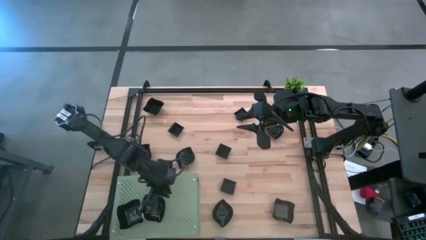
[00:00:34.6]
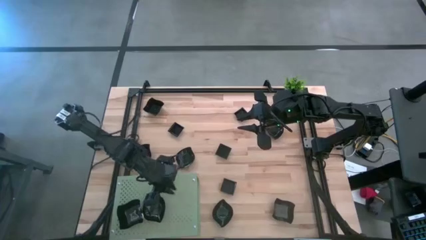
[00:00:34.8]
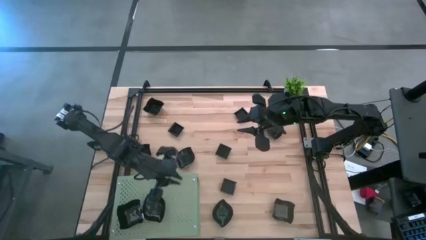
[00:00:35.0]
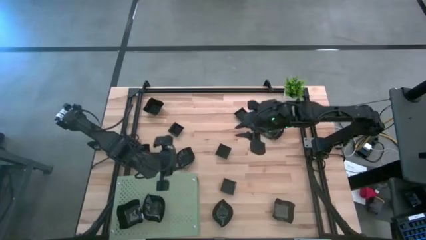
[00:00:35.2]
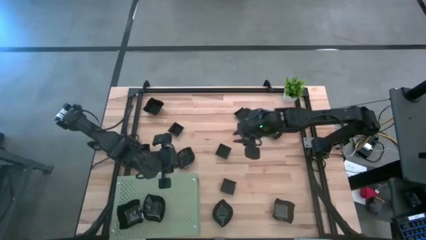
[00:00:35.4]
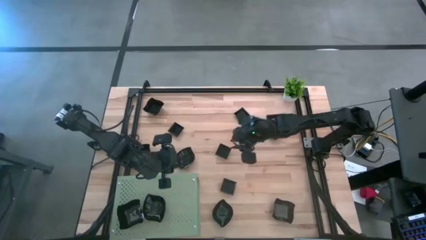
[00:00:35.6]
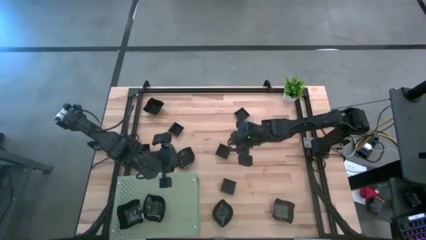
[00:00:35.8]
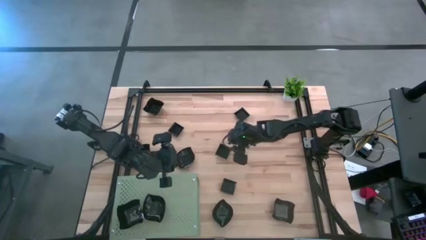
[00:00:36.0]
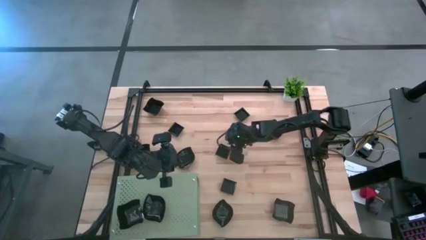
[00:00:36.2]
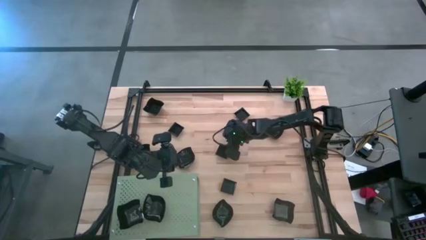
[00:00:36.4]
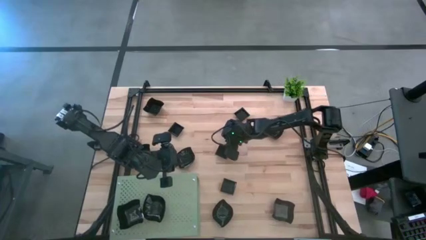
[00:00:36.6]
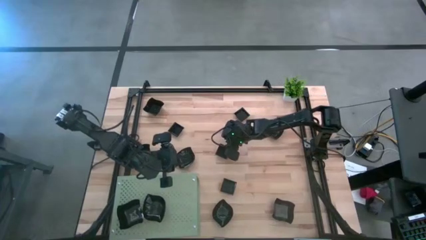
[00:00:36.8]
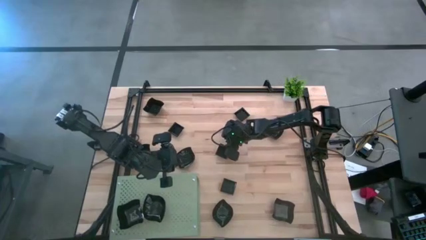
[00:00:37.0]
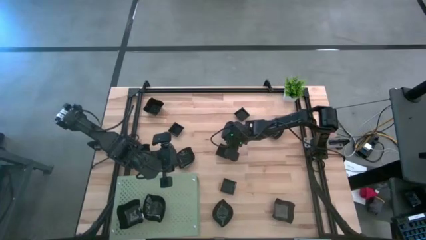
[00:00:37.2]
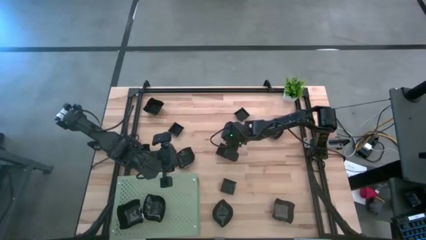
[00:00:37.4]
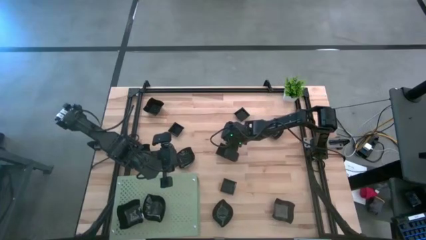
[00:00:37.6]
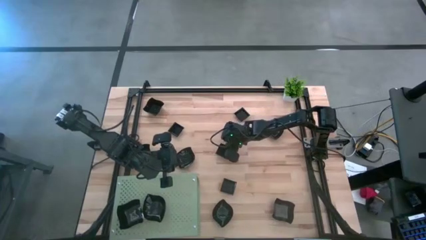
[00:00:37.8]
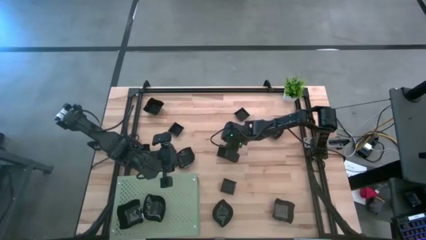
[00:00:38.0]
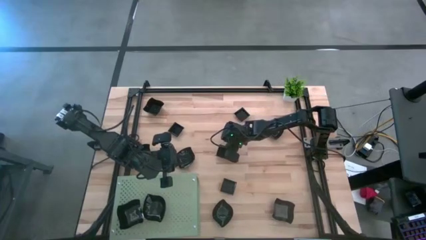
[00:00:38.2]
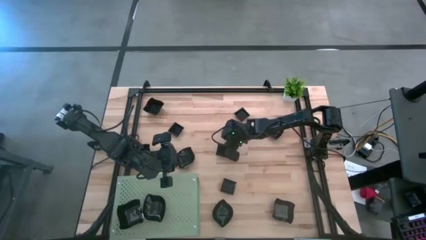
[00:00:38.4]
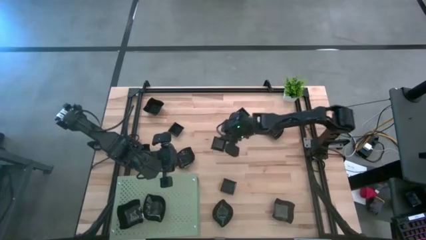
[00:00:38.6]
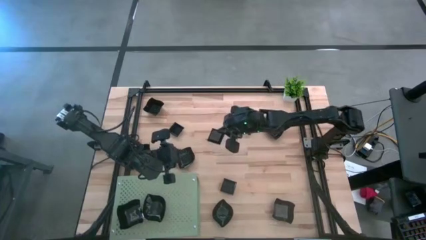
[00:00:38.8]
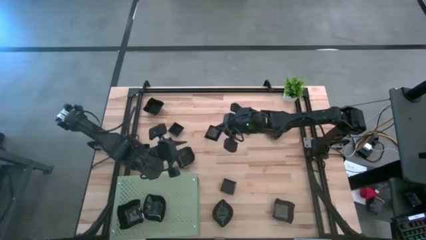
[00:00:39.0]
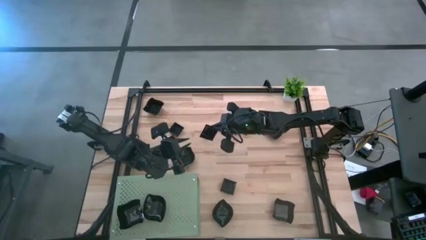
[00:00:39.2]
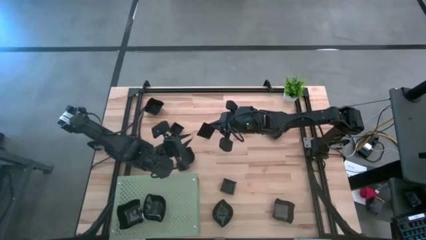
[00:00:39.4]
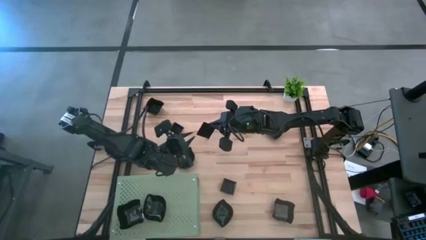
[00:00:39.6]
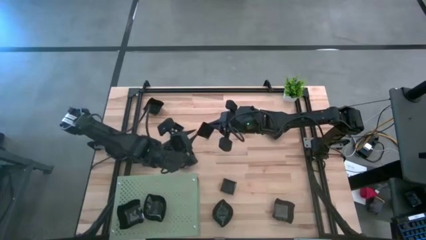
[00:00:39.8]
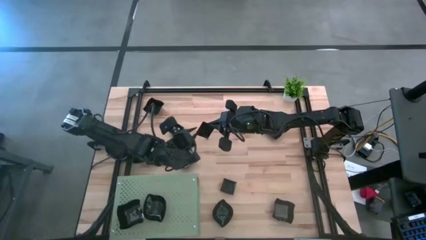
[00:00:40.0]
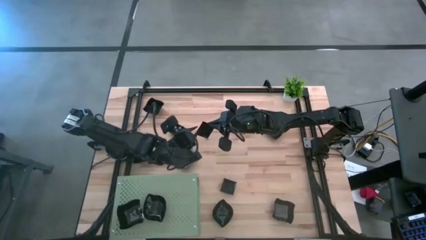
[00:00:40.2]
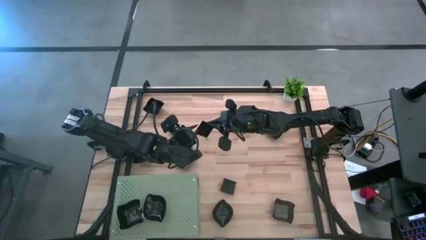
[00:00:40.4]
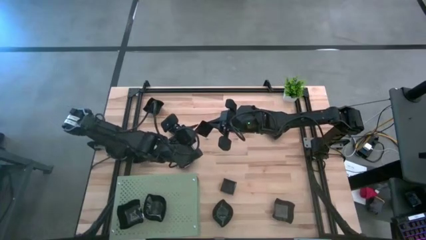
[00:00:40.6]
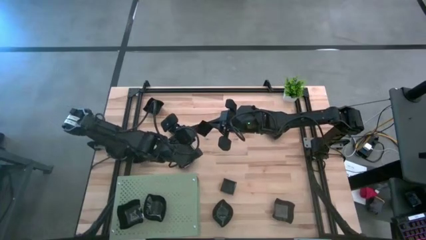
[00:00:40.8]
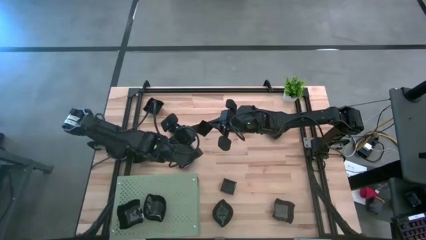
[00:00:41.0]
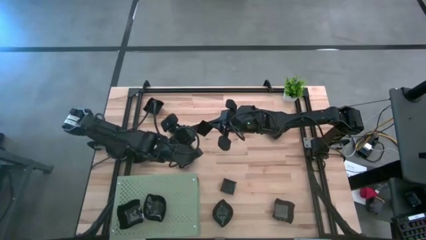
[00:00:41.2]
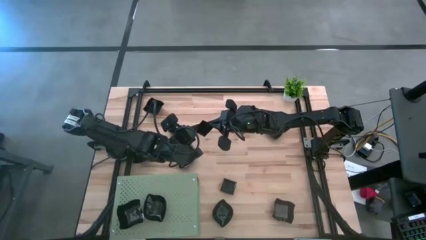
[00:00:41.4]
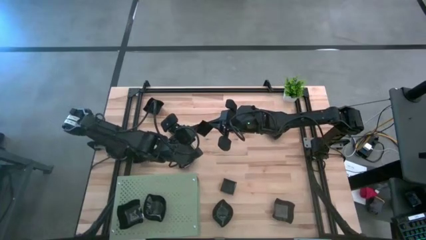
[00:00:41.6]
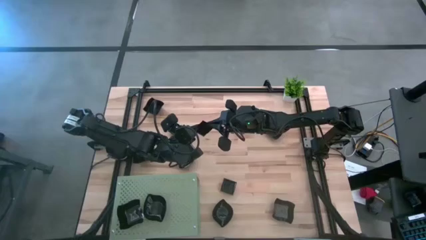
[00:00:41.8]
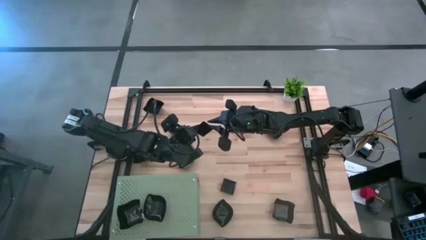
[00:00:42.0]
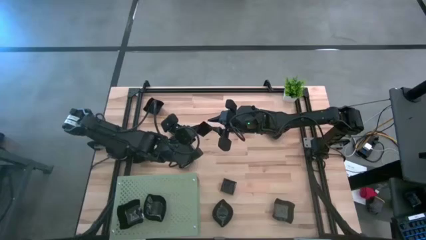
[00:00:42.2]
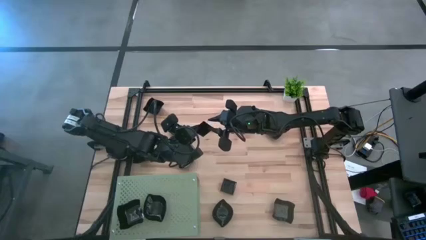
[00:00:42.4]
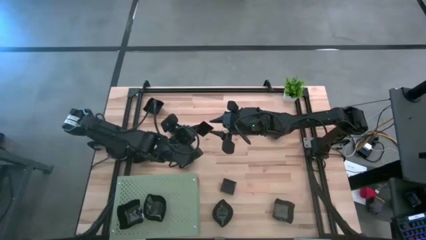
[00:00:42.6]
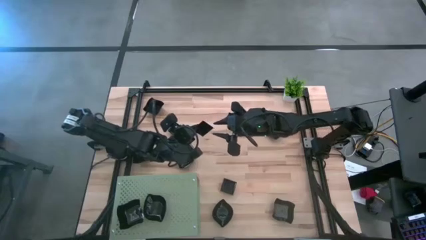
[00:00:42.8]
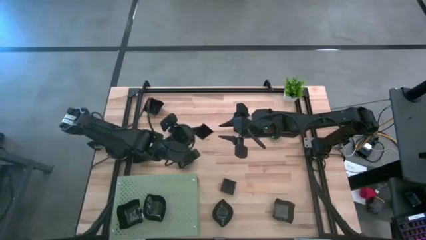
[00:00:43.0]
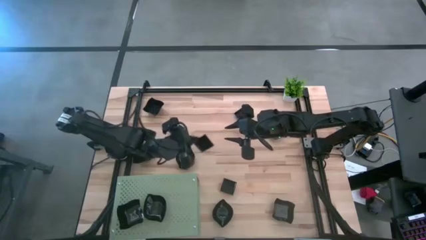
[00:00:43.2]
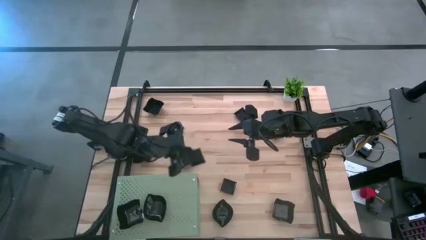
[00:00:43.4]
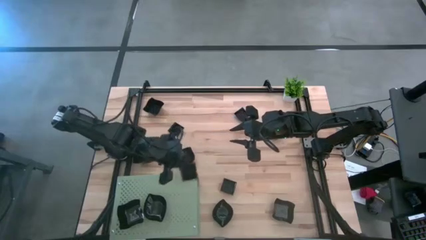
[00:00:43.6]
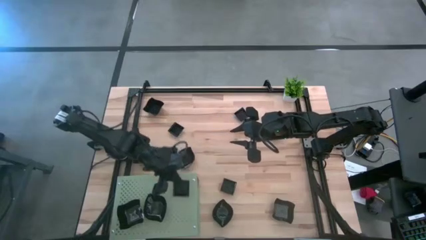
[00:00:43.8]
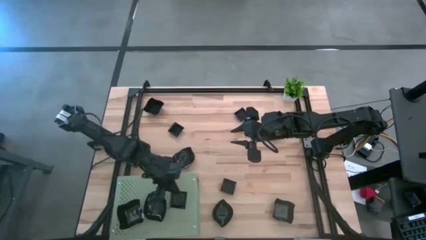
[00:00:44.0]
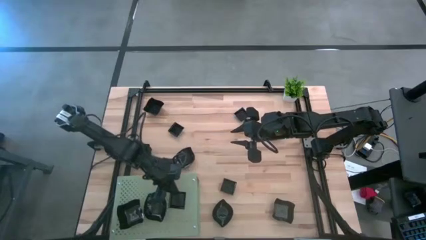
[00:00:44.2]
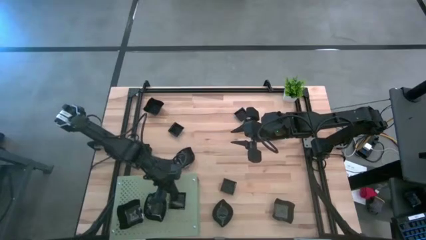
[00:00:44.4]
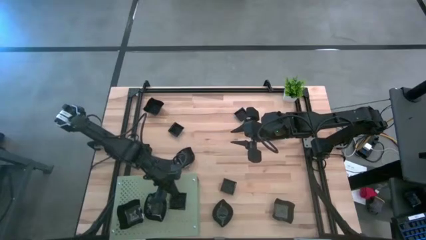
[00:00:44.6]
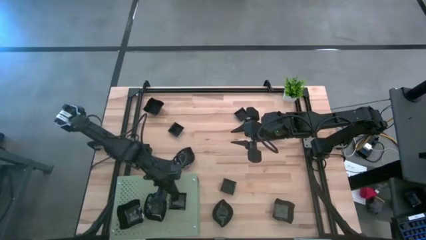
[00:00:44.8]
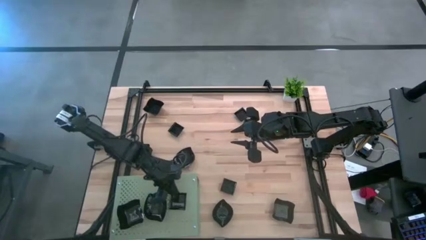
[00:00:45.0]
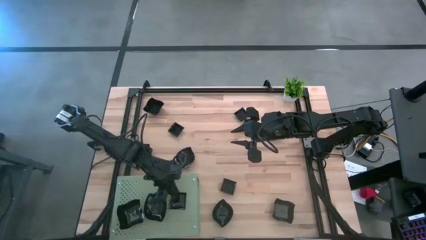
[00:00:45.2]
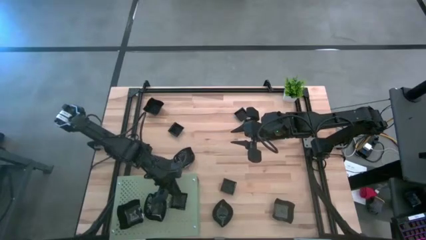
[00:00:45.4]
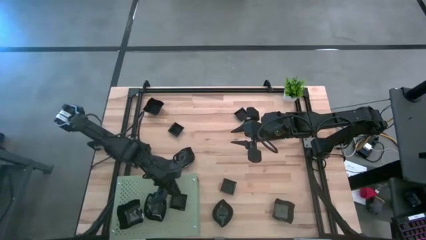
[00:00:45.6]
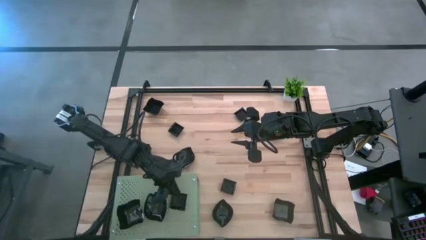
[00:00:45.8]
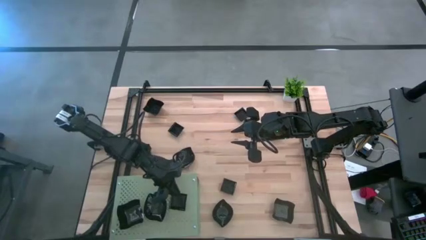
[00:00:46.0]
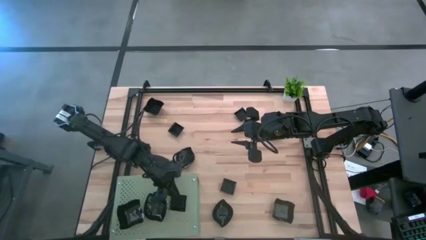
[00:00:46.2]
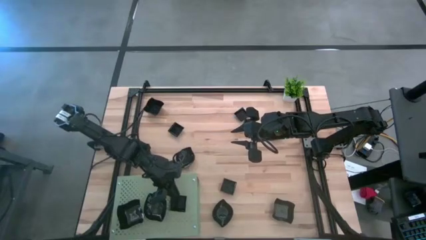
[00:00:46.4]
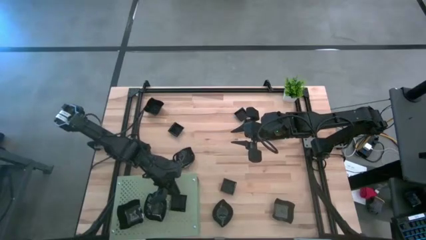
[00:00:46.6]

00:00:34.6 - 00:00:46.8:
Task: Pick & Place Mini shaped plates
Put the black square plate on the shelf

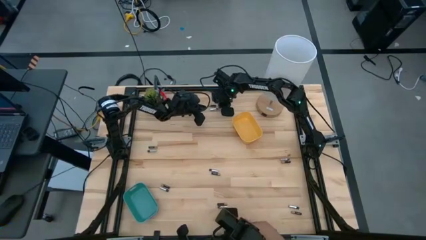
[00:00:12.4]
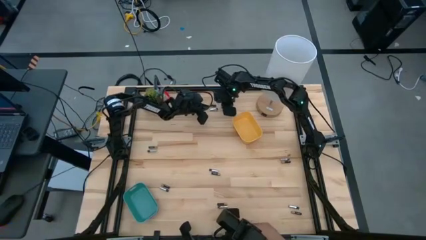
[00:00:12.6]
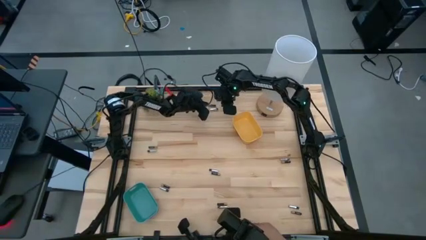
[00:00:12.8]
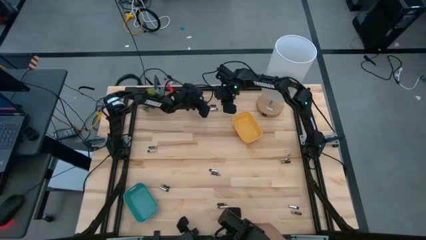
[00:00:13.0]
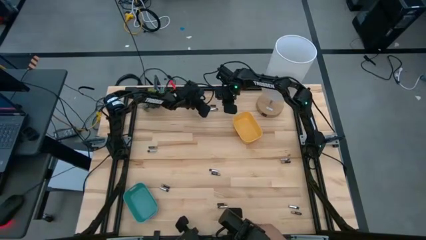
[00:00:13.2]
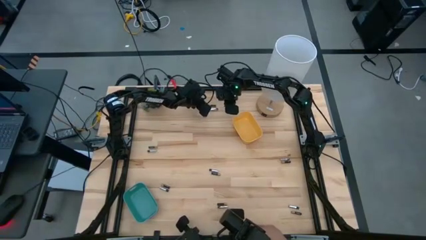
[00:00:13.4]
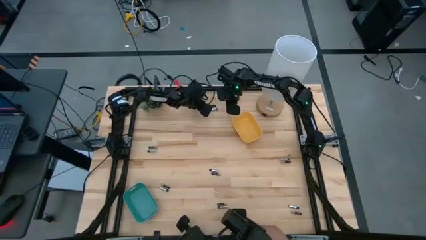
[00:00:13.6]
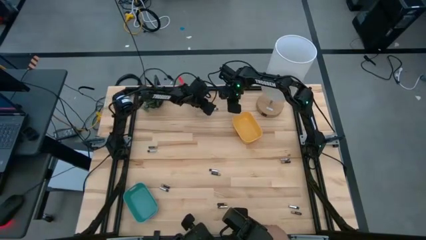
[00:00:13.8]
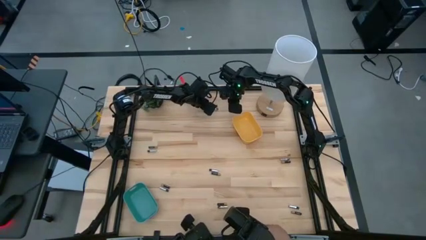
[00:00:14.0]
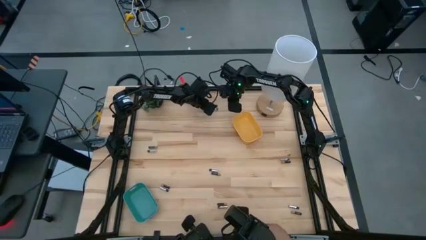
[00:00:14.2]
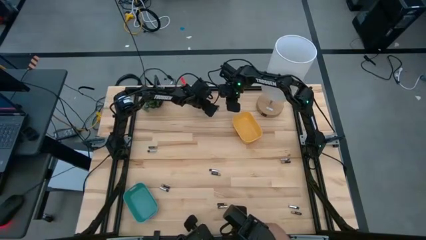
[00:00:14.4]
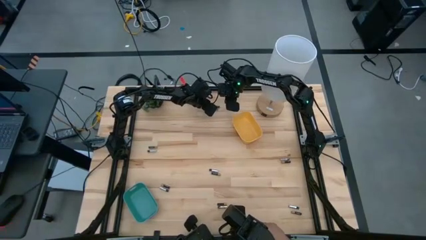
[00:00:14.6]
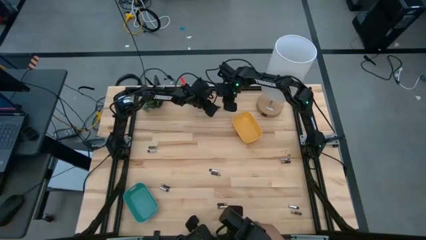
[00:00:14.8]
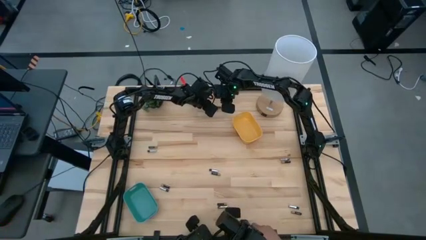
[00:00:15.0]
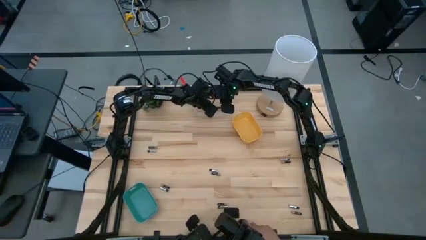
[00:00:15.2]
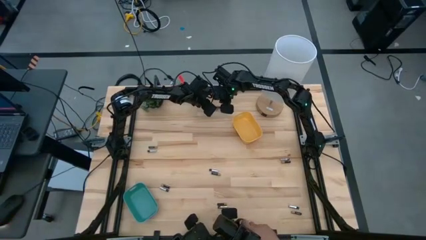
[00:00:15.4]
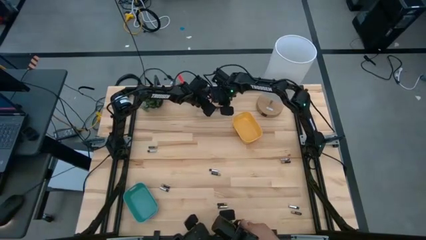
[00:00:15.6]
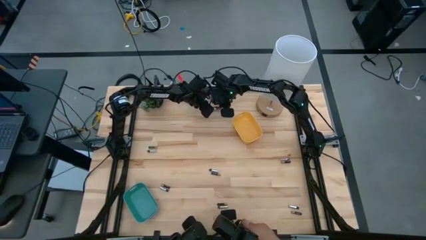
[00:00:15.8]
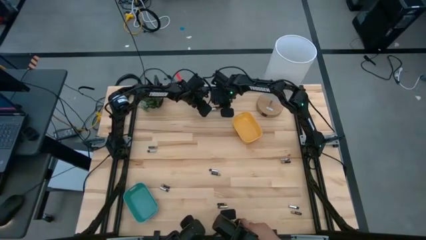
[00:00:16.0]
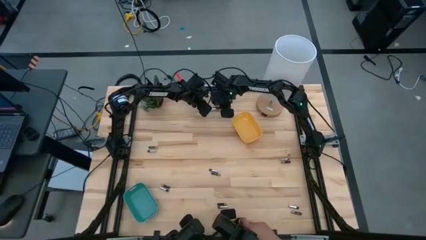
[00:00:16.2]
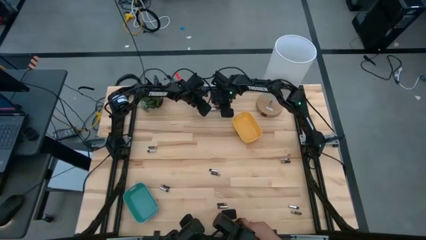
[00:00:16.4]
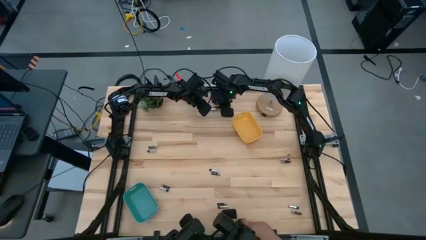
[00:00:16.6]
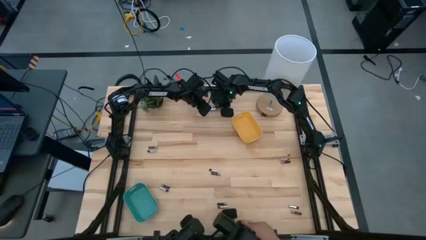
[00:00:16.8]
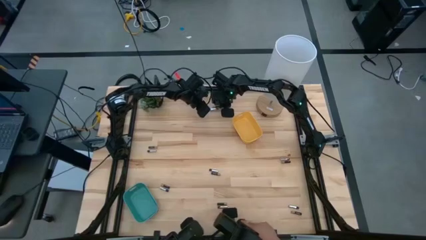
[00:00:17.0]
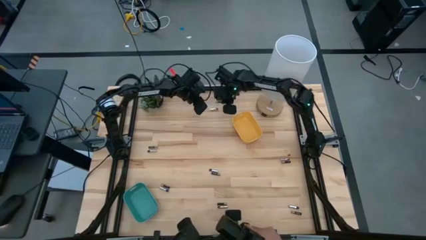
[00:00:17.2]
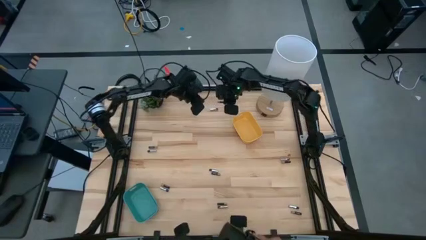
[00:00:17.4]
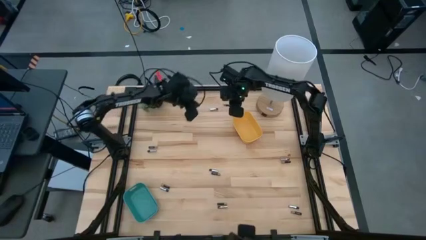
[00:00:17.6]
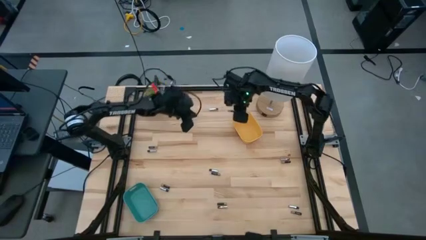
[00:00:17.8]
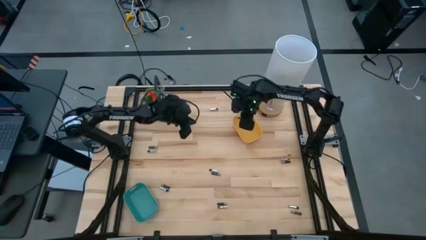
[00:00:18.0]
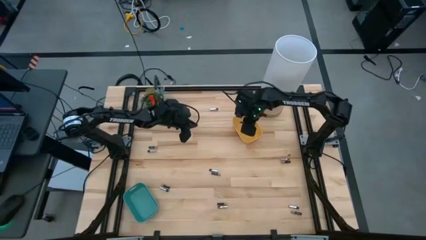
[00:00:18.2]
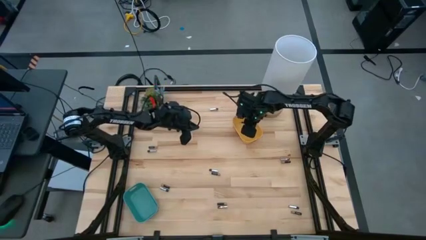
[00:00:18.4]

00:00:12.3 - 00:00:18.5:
Task: Sort batteries
Put the black battery into the yellow bin
